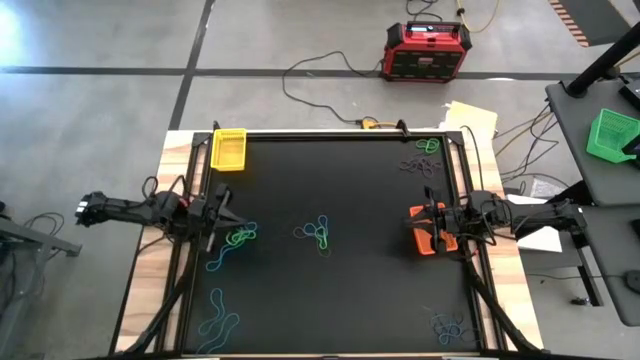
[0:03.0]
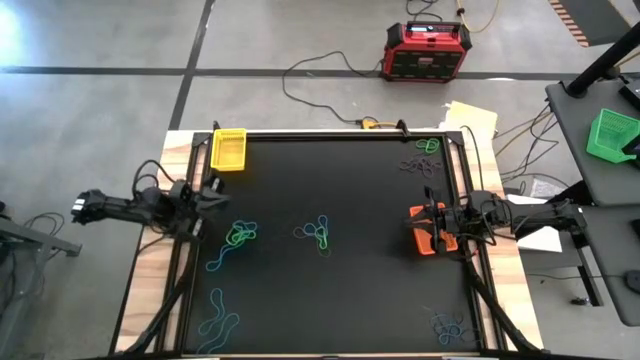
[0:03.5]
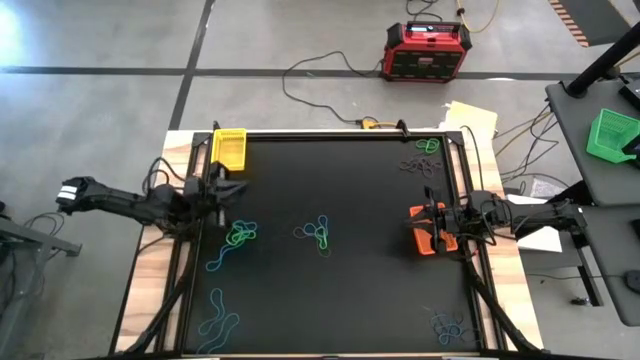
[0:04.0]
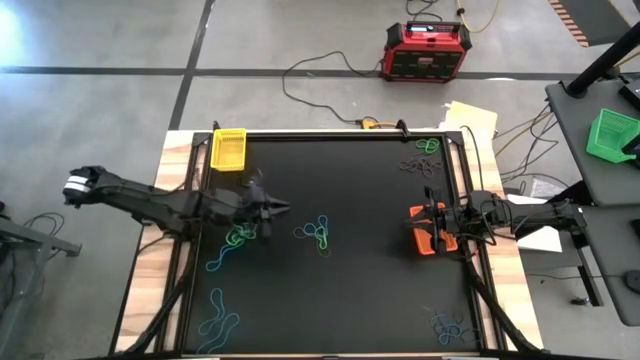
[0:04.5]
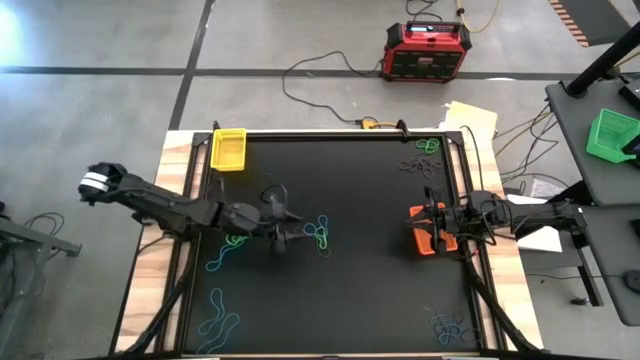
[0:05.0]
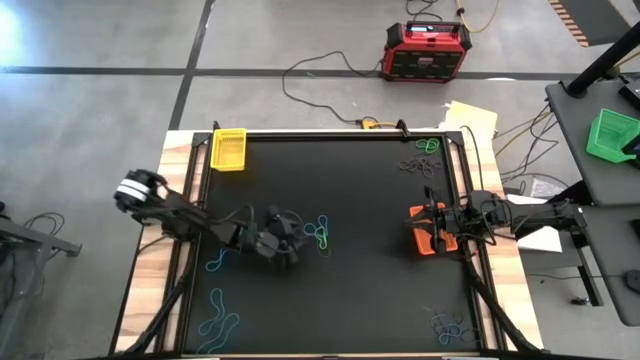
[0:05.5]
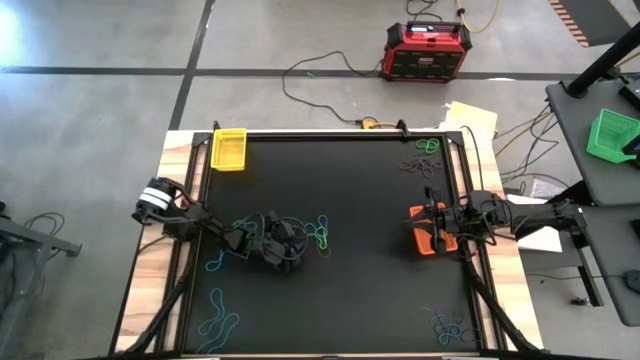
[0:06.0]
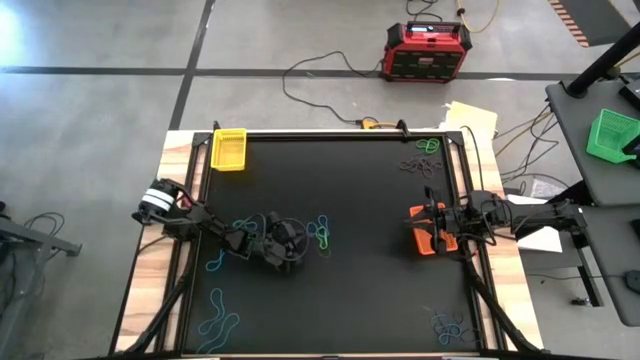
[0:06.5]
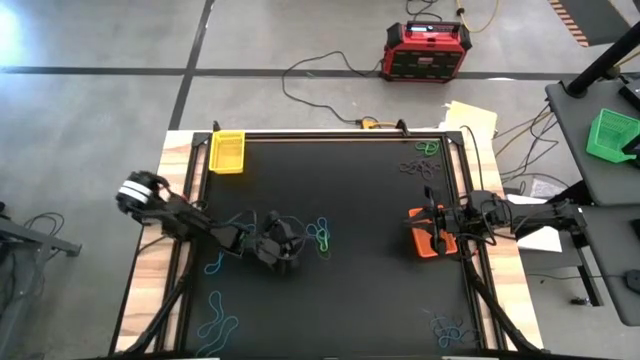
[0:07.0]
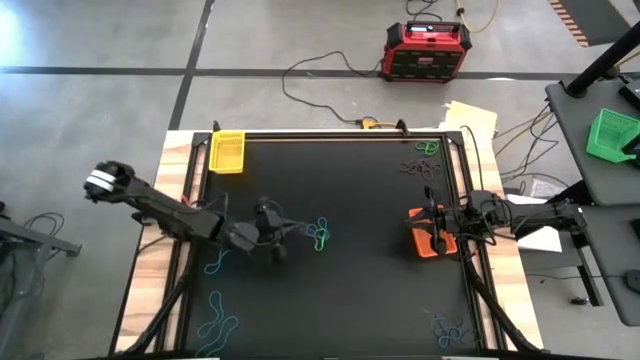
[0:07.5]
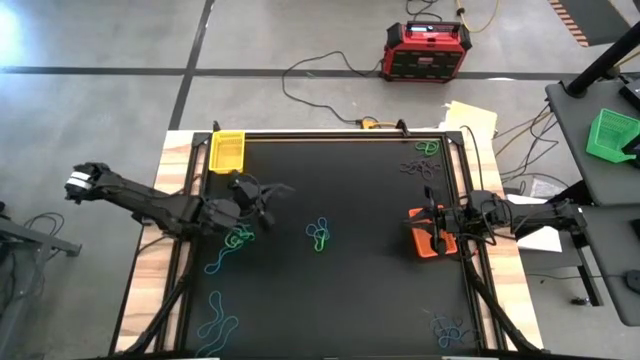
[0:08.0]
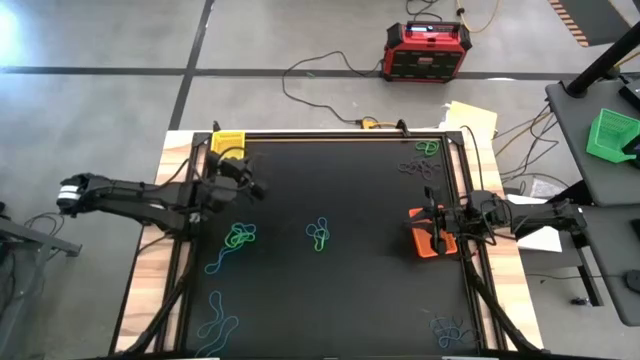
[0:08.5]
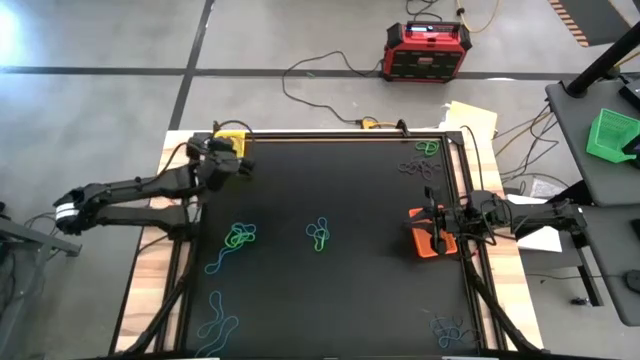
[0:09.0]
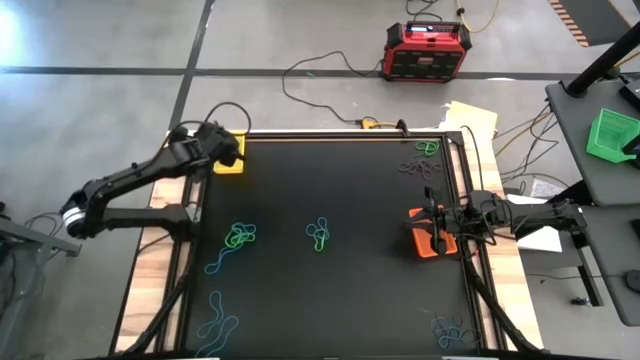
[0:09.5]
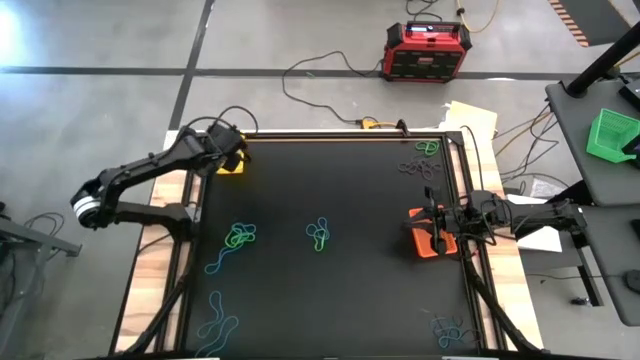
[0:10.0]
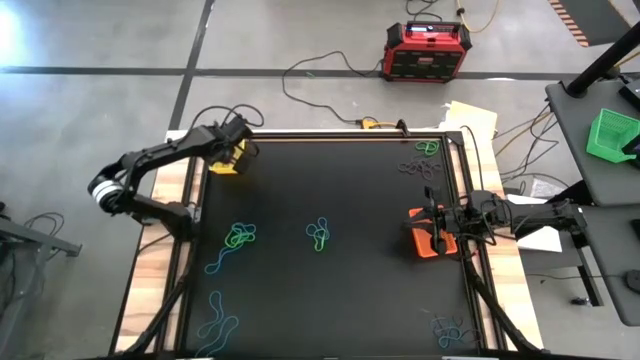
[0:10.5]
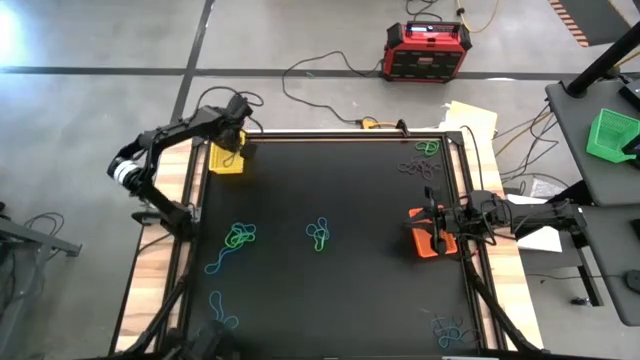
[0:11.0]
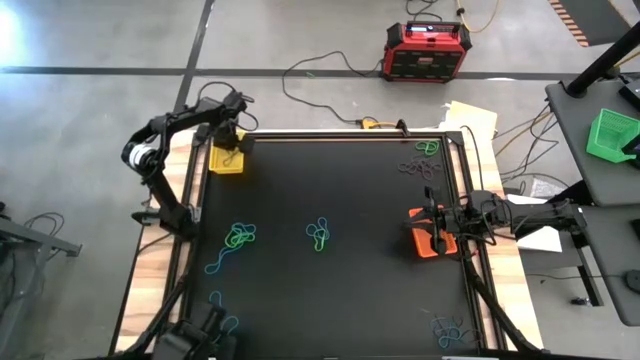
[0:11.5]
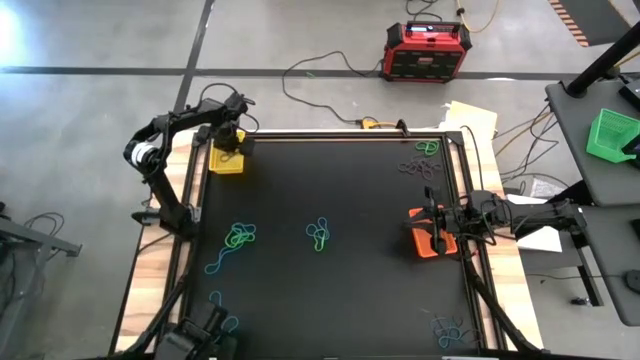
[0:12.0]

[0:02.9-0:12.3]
Task: Sort rubber bands into baskets
Put the purple rubber band into the yellow bin

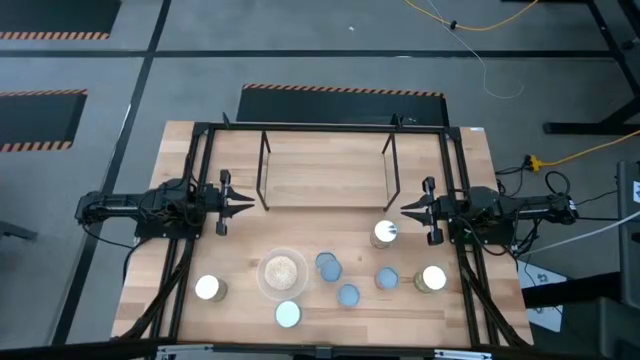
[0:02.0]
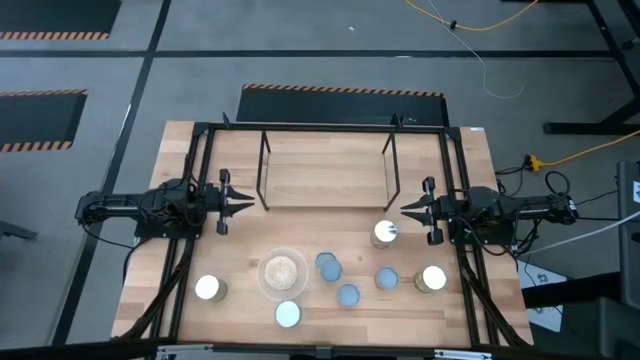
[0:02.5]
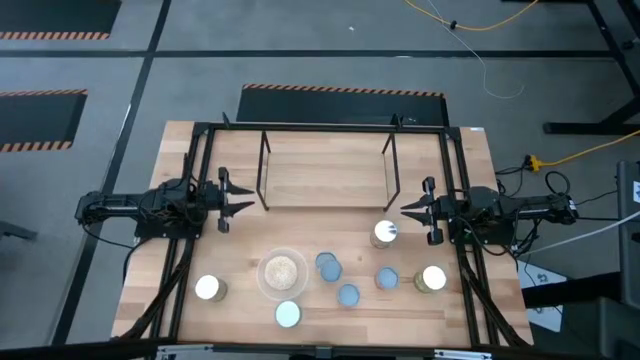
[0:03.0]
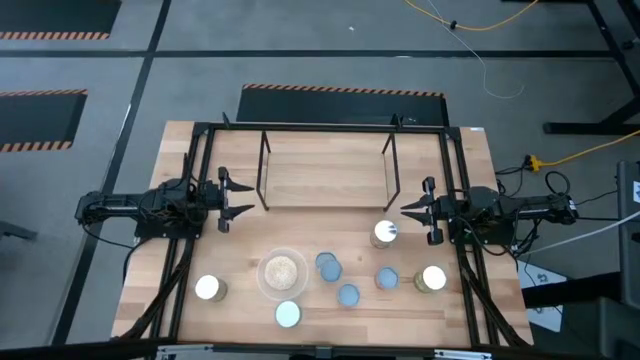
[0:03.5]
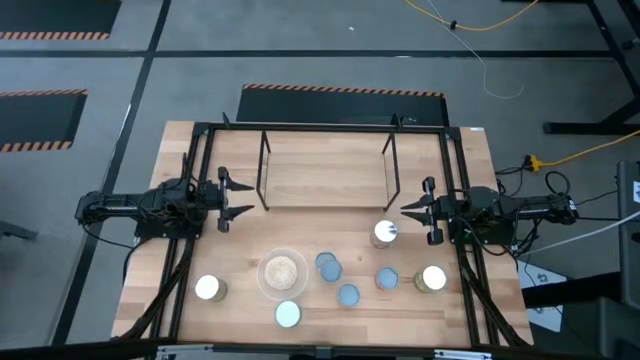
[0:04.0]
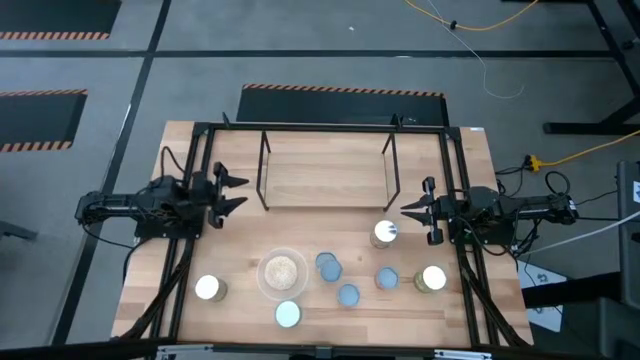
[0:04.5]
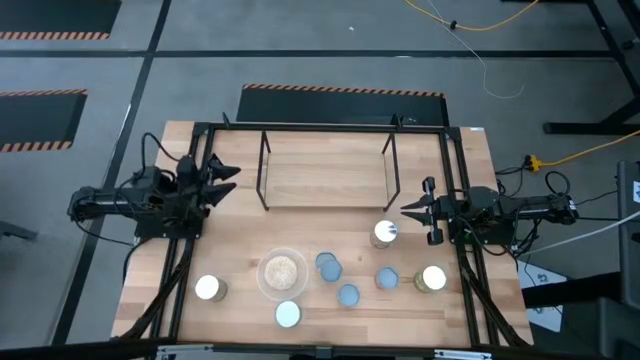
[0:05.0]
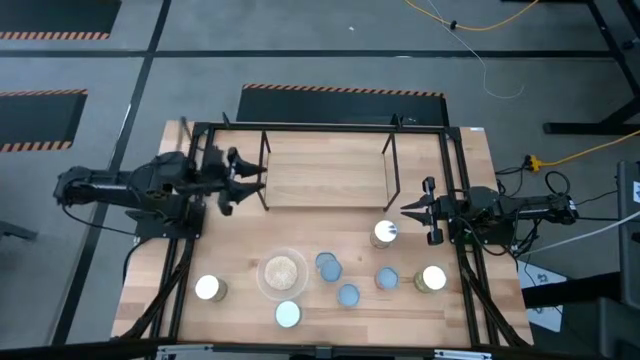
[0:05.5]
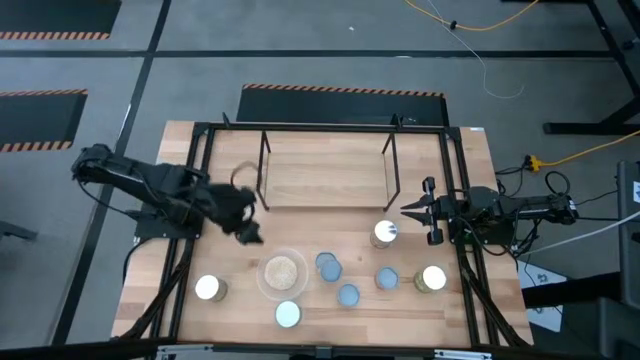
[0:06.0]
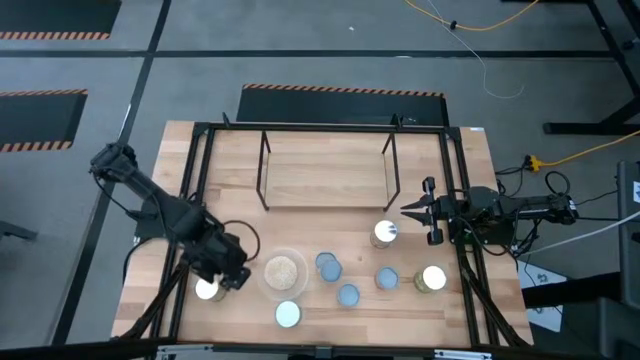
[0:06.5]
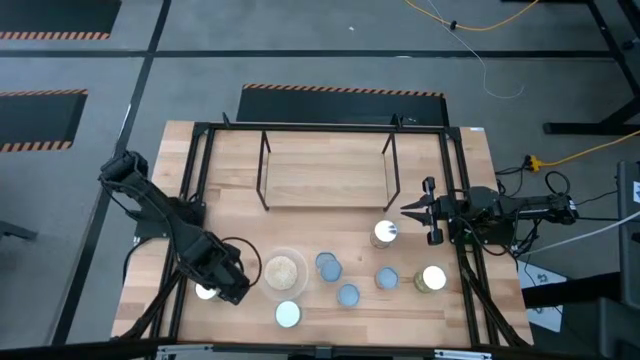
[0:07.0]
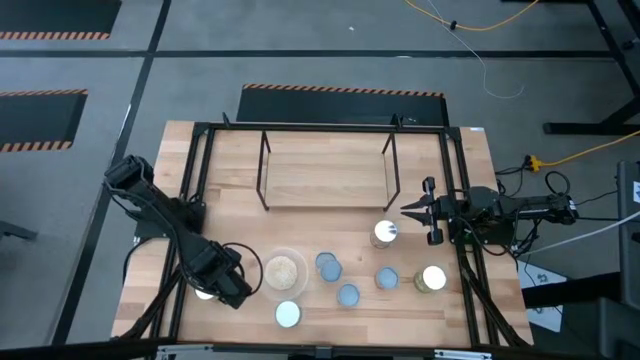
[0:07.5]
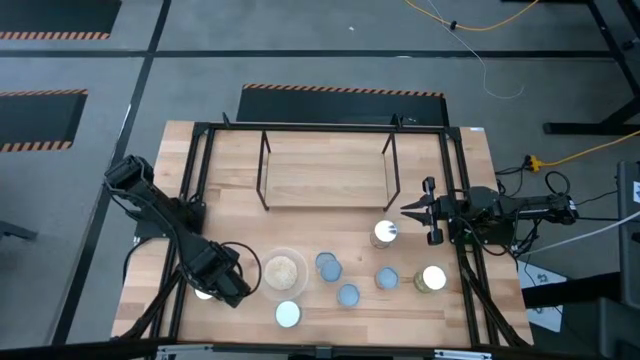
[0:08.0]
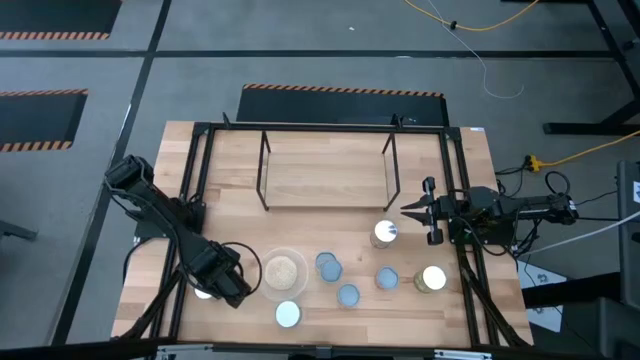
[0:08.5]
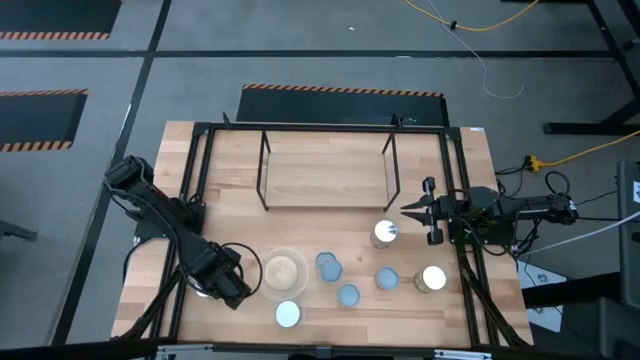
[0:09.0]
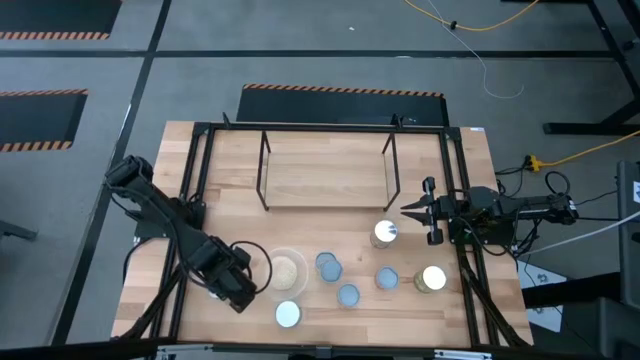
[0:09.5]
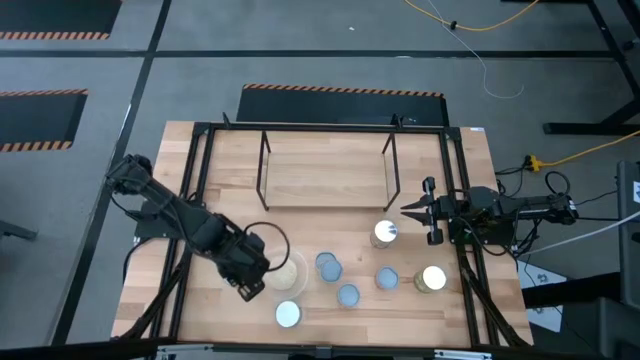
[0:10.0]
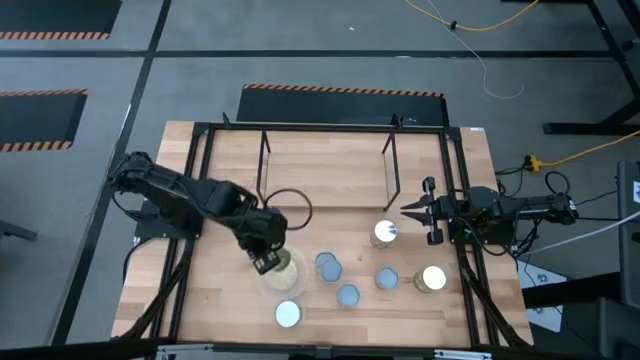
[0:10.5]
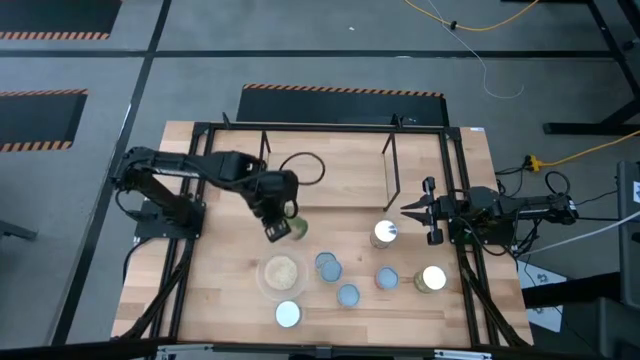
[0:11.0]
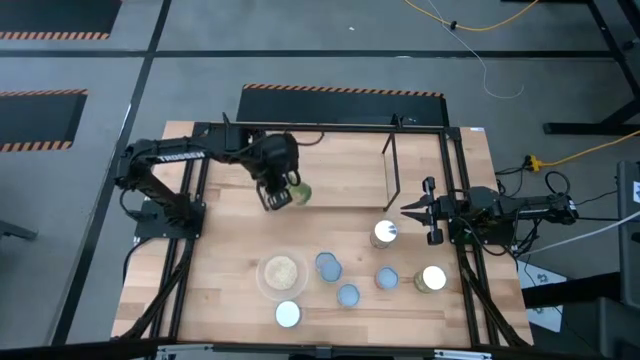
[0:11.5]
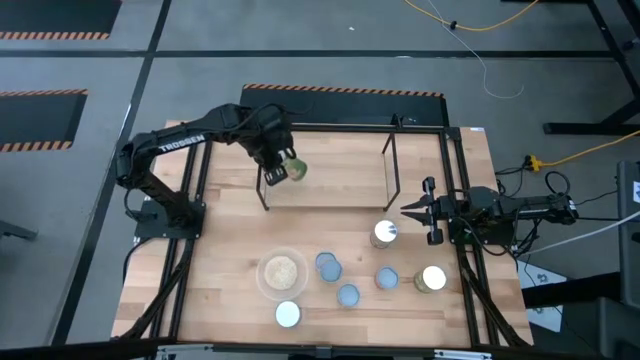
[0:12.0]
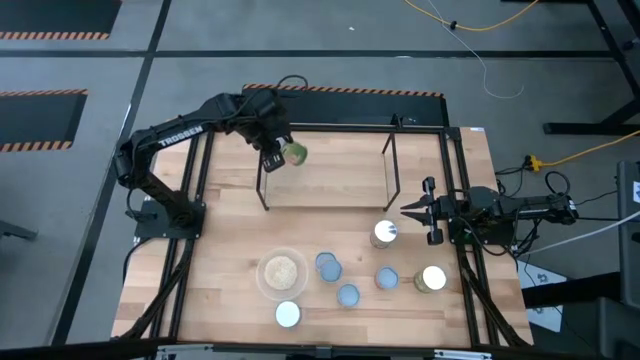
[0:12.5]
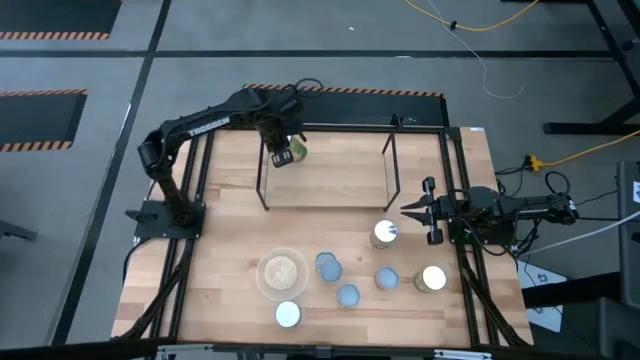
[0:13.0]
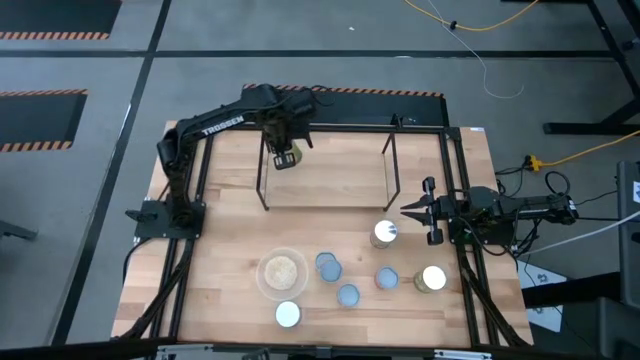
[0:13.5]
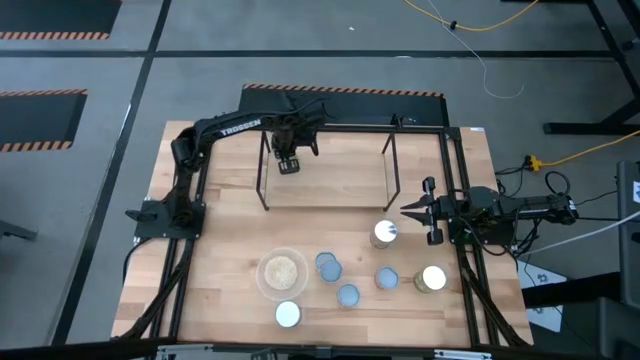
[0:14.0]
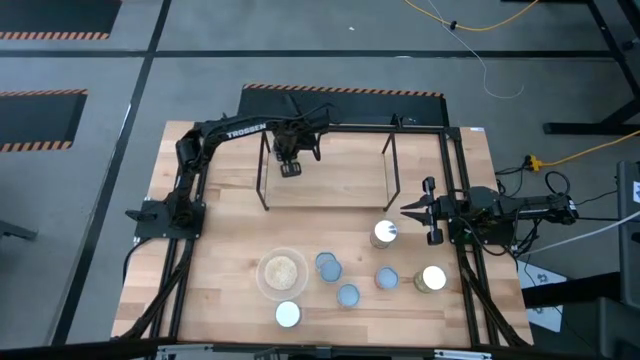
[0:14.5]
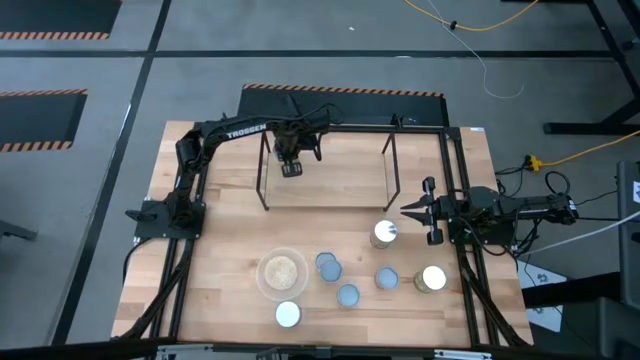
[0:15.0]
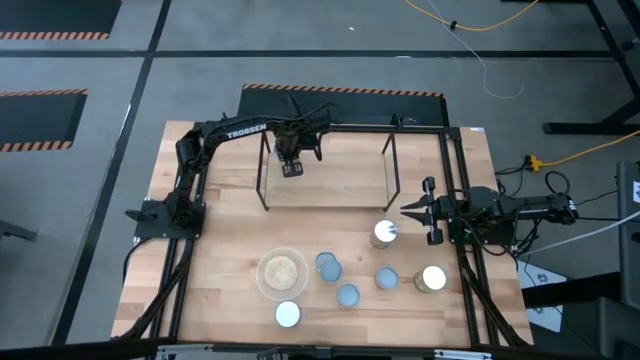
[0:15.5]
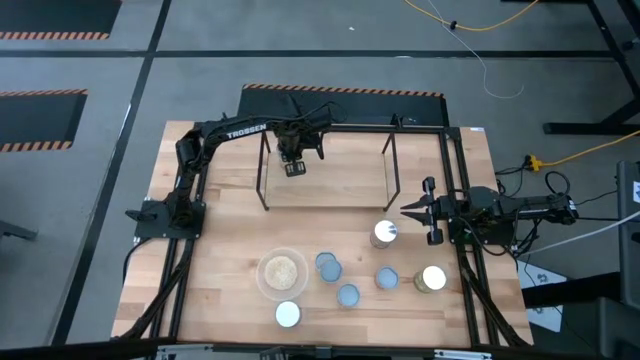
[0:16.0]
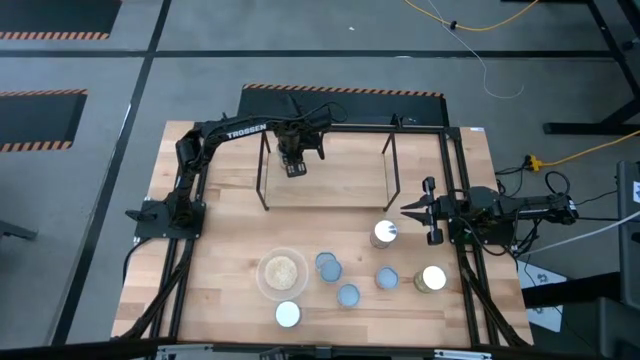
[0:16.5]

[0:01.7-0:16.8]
Task: Pick and place cans onto a shelf
Put the left canned oranges on the shelf
